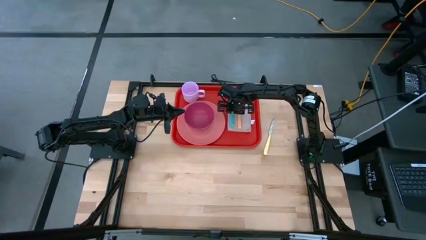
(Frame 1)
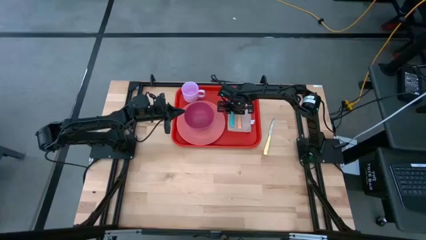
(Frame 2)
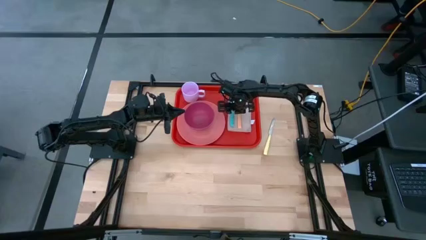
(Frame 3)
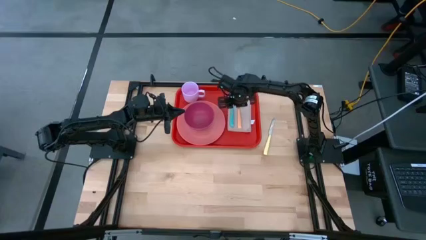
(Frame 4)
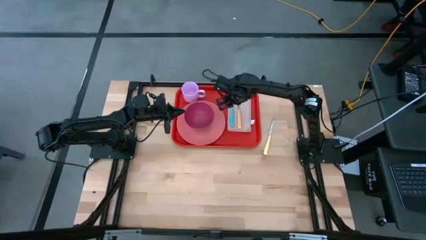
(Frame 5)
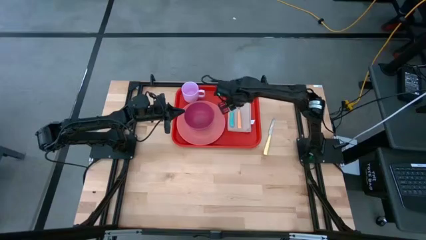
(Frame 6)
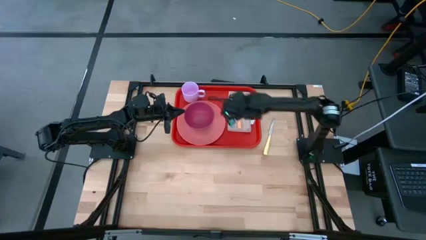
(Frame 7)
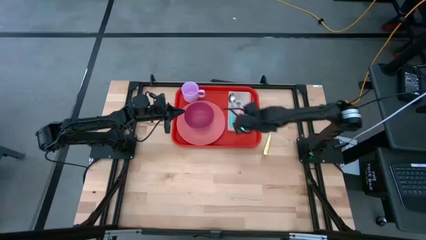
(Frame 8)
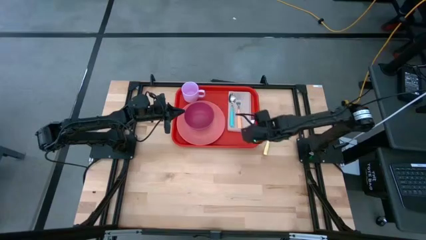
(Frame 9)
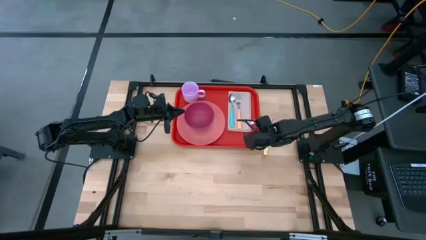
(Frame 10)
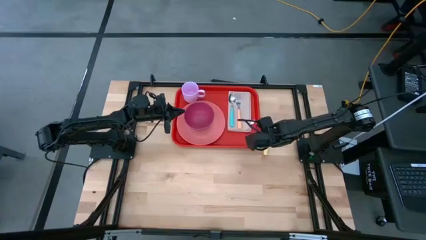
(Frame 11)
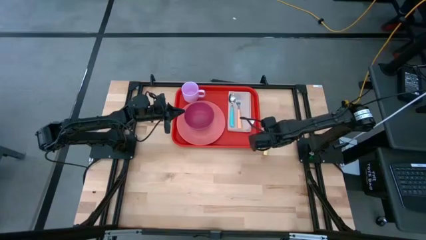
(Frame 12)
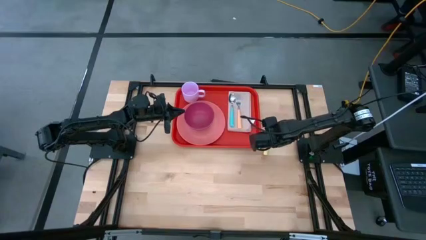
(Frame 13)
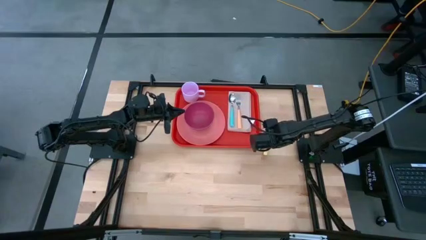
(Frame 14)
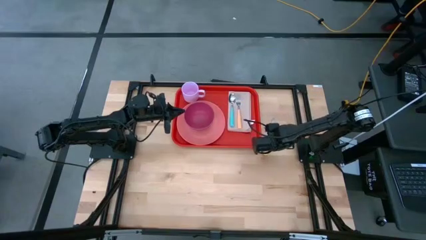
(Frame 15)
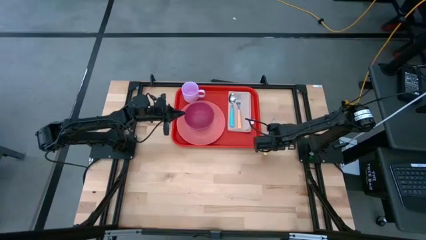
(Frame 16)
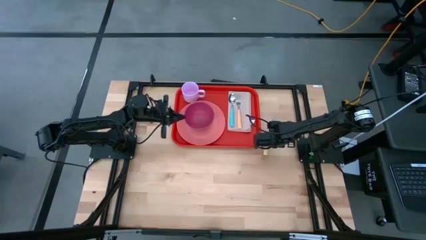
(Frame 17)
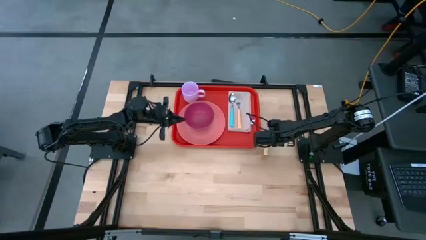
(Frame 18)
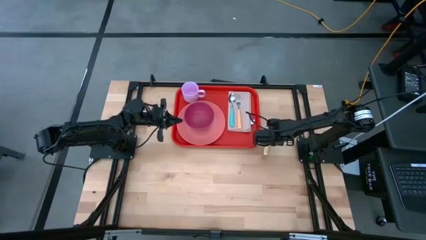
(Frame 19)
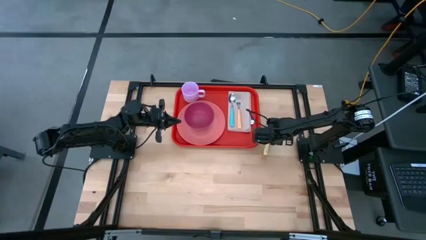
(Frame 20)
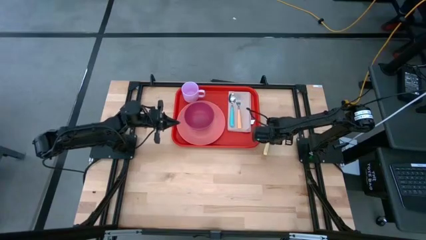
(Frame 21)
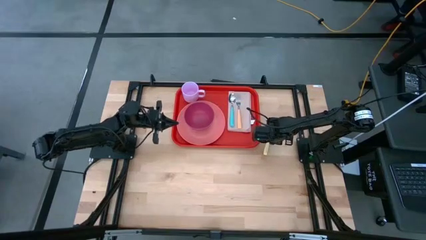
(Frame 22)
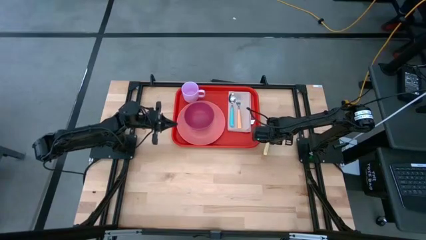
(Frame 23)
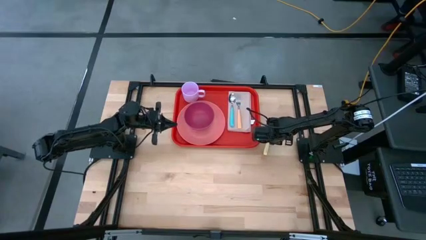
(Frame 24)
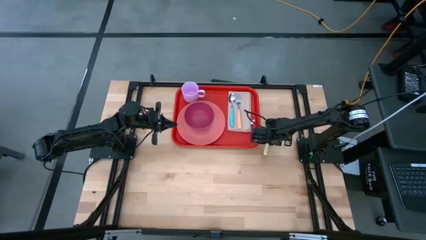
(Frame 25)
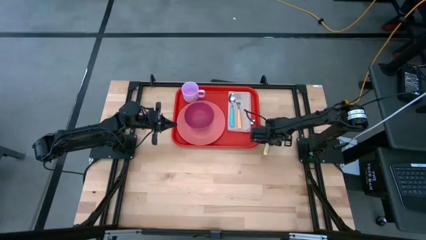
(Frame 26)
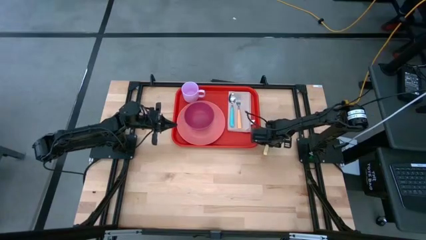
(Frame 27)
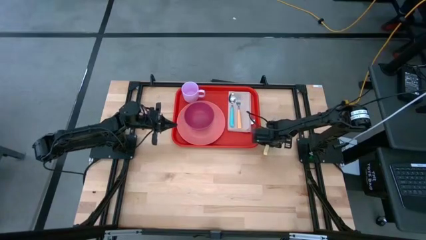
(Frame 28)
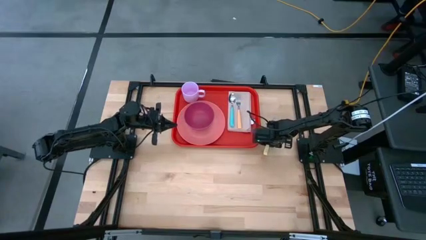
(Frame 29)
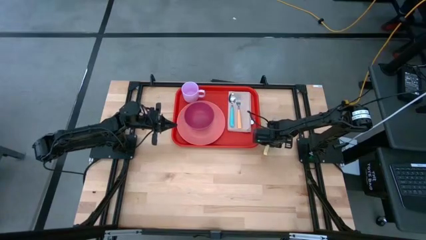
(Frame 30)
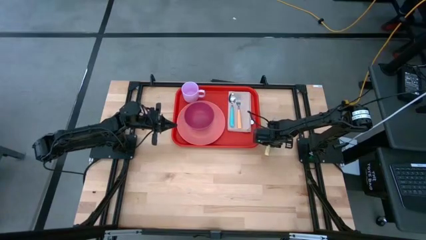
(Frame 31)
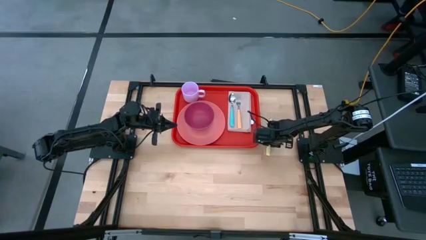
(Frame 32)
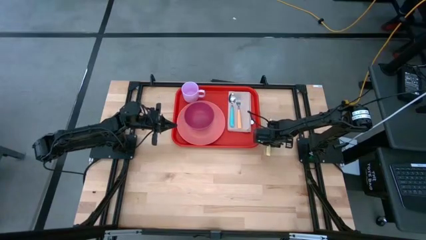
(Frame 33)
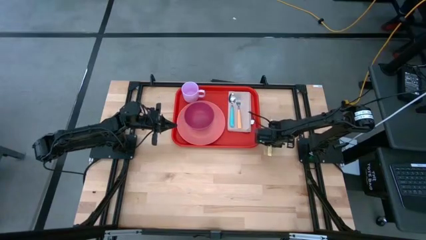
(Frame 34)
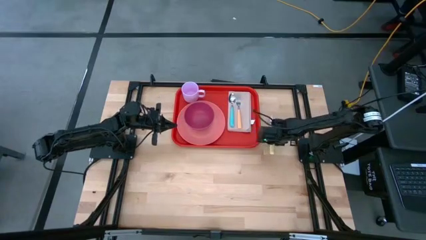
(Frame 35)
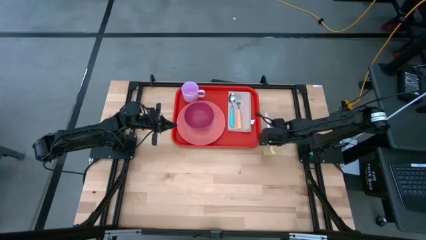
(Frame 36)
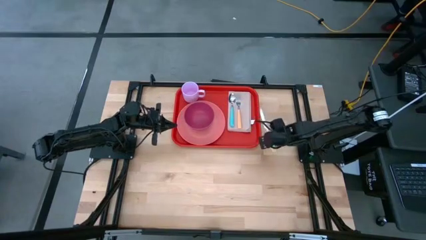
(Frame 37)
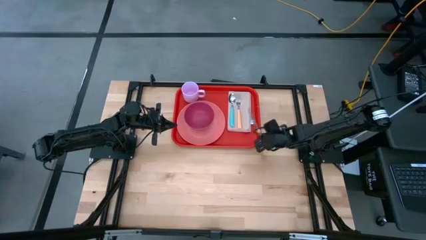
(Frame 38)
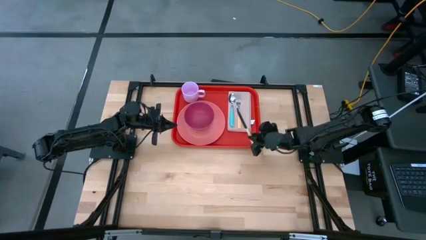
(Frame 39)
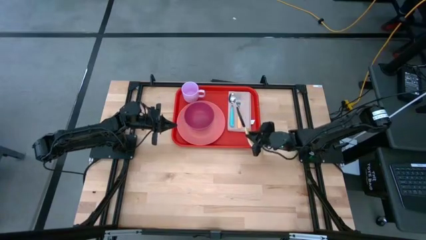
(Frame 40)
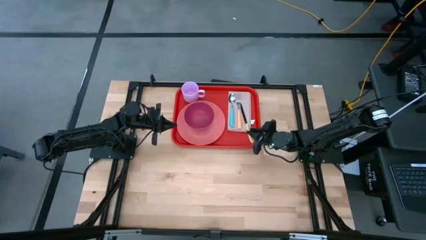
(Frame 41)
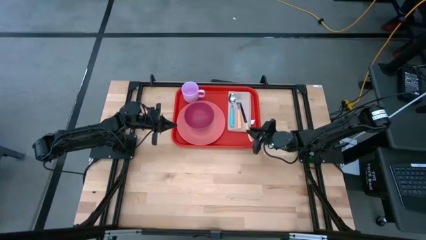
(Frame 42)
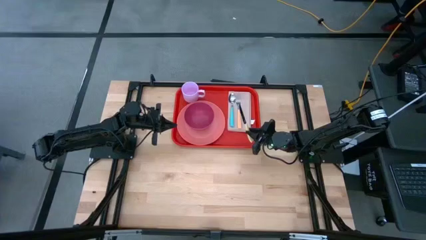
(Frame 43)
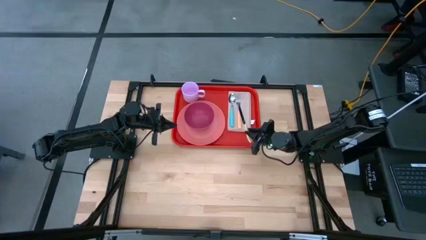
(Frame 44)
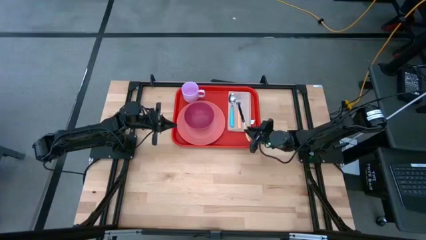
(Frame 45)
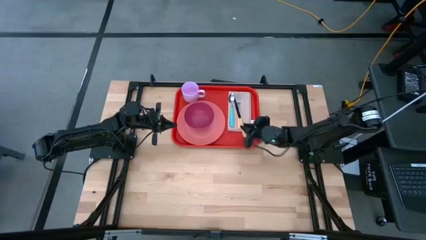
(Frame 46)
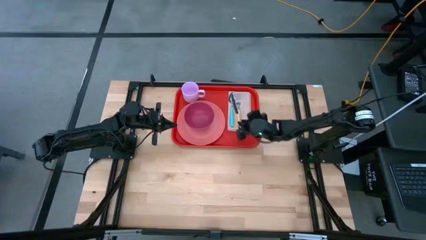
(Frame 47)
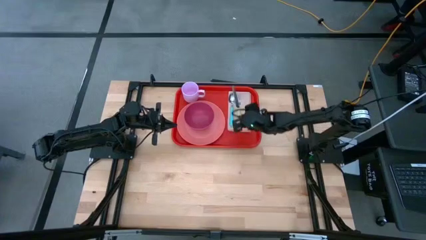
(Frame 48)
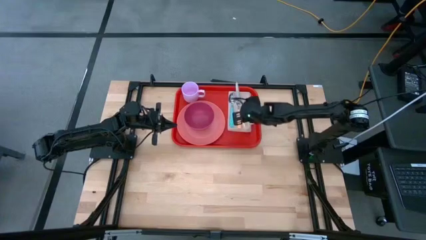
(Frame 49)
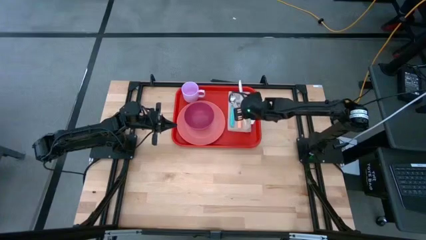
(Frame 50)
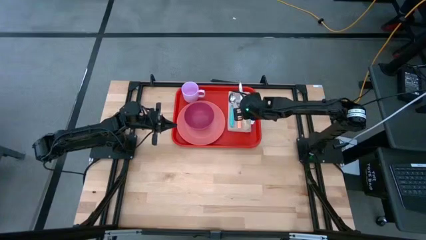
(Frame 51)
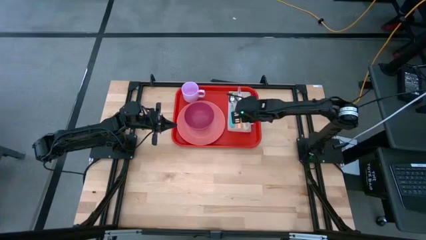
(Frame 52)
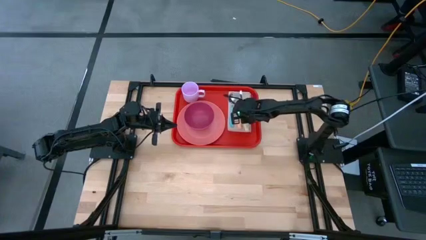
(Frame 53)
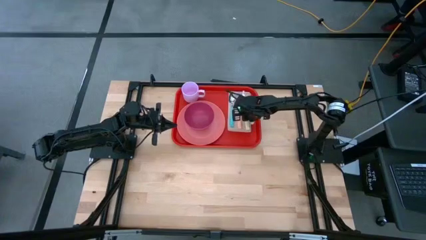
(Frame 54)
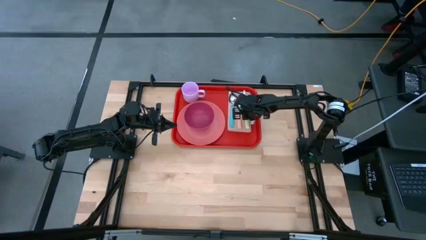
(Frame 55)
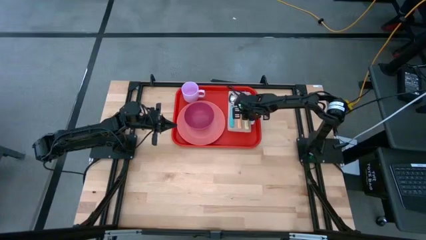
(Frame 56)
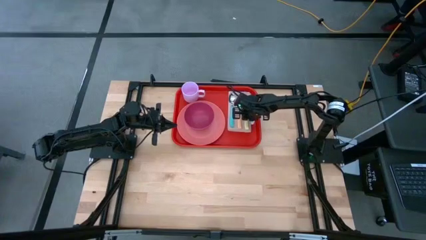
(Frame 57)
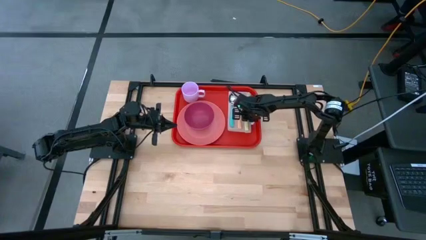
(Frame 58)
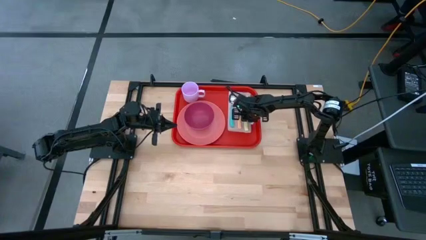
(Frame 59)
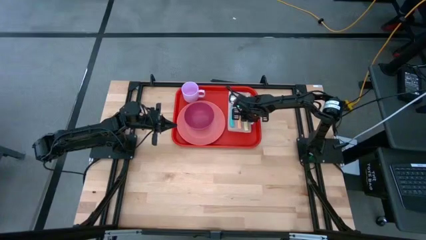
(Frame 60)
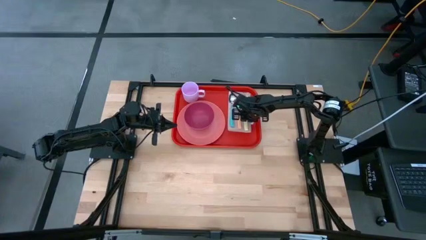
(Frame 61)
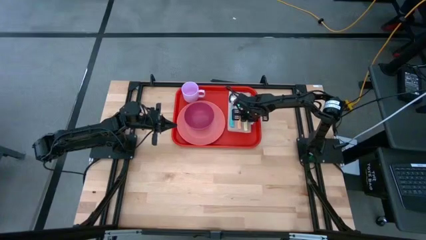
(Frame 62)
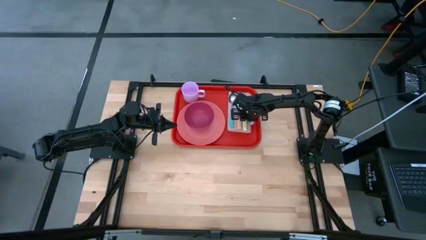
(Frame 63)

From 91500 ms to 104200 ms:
Task: Set up tray
Put the yellow knife on the right of the orange fork on the red serving tray

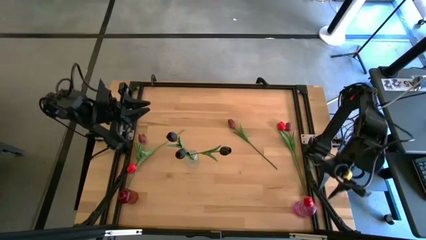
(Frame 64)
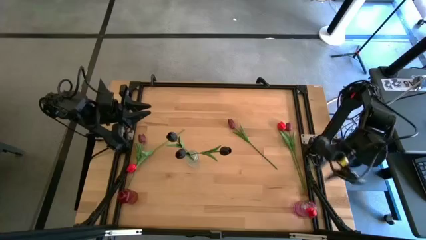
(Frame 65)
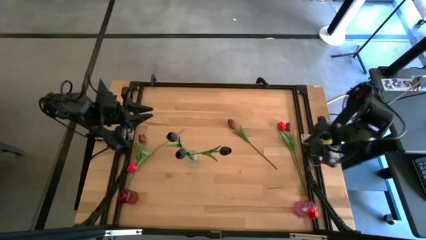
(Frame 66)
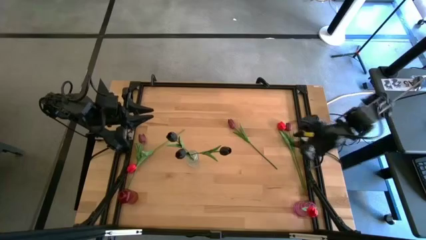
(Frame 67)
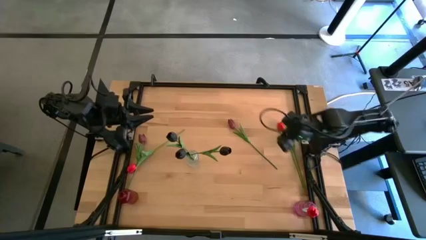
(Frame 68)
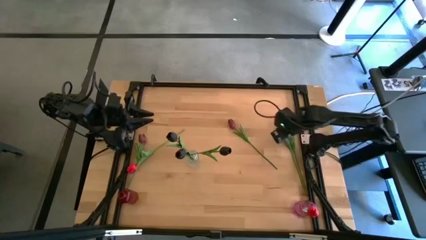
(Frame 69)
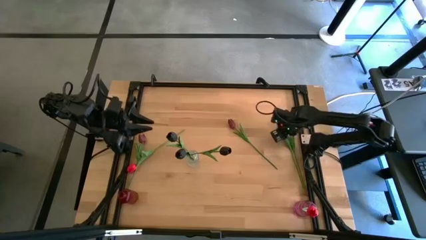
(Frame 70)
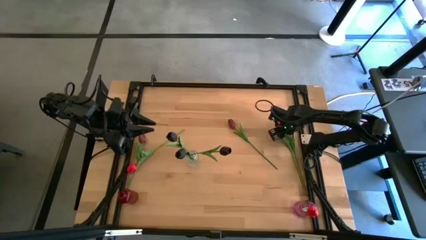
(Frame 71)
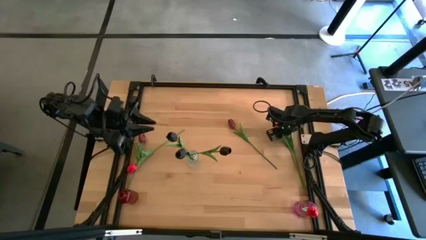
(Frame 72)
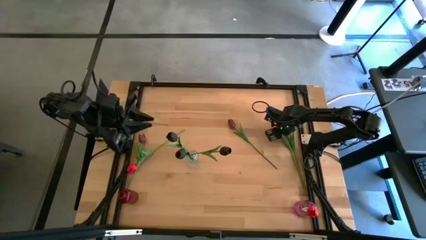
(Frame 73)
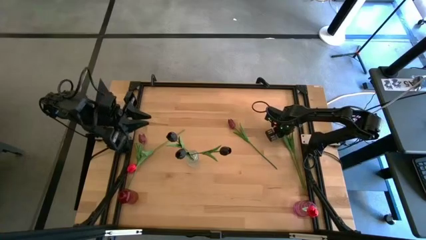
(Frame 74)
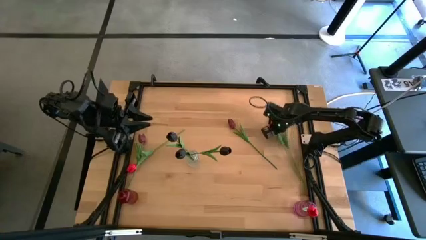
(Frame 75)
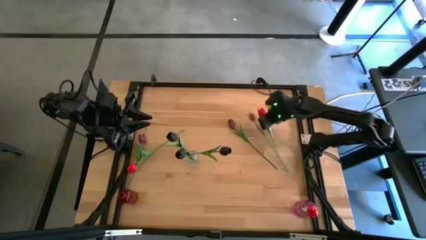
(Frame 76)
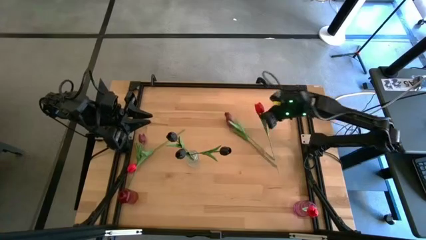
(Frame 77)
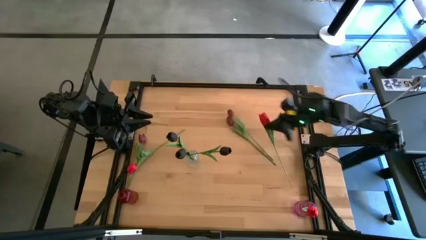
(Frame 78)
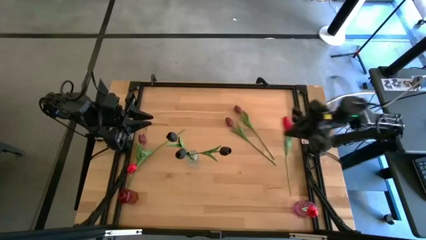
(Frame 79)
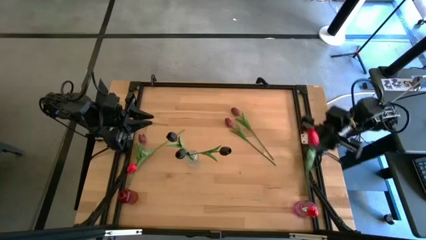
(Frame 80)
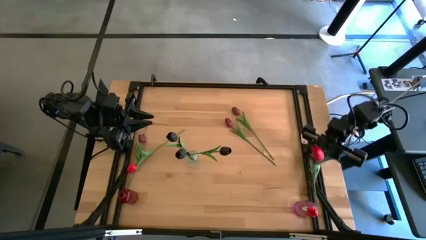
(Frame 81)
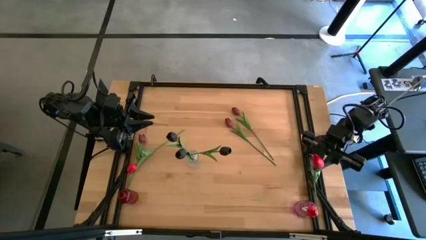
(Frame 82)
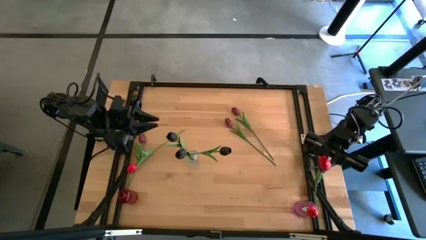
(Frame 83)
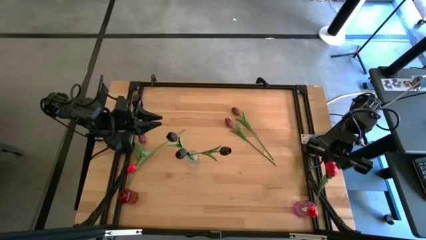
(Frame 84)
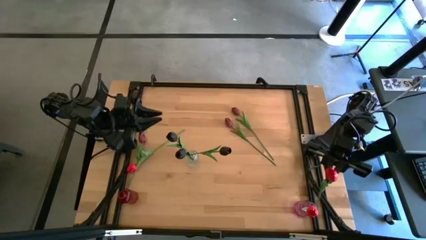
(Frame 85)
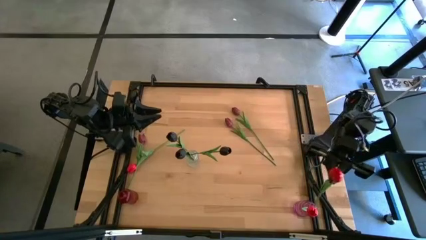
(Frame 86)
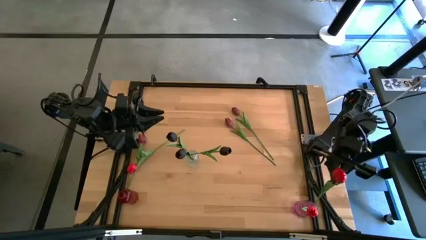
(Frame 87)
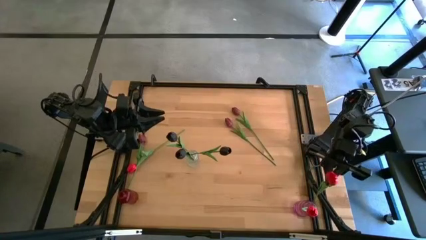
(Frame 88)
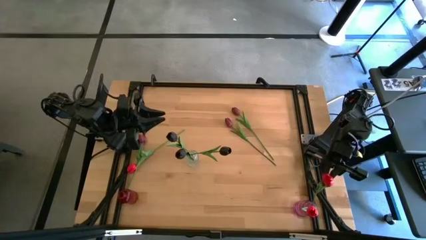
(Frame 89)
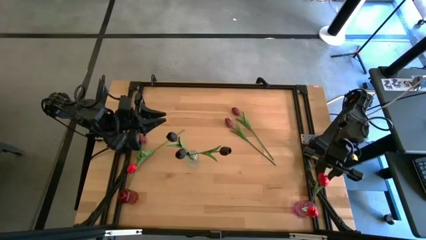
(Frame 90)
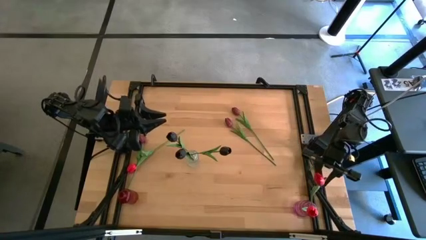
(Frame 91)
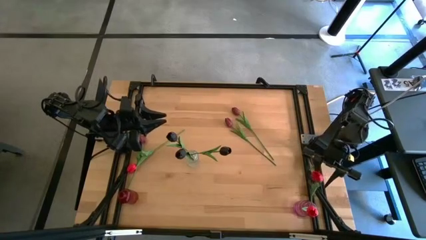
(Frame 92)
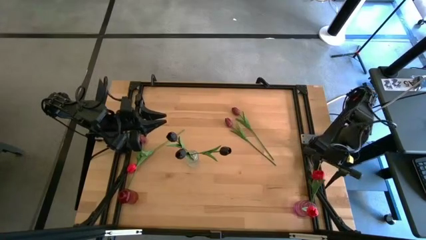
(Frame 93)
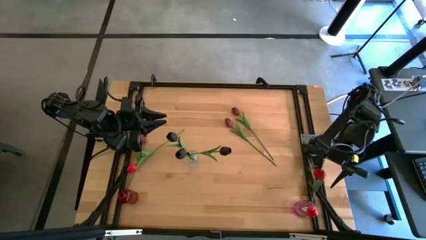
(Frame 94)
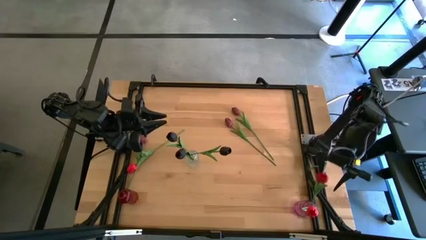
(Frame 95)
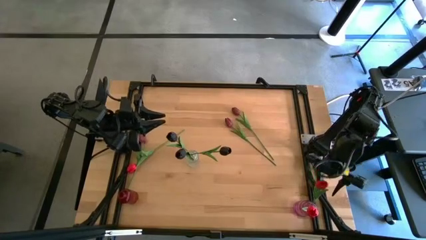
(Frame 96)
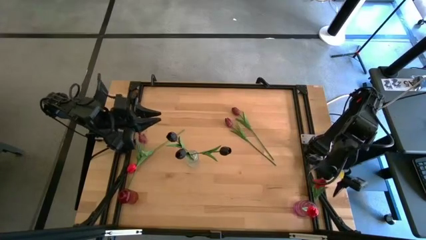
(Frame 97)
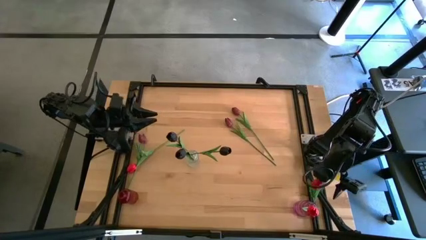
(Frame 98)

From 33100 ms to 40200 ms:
Task: Sort flowers into vase by color
Put the red flower into the violet transparent vase
